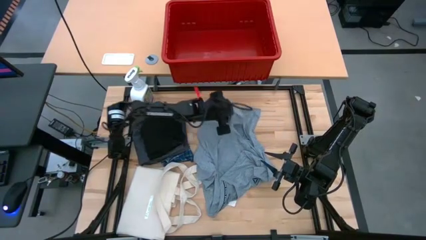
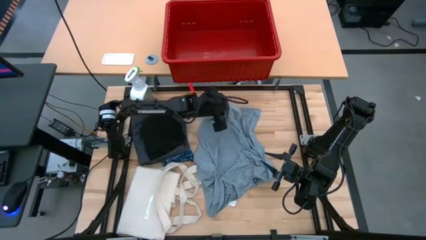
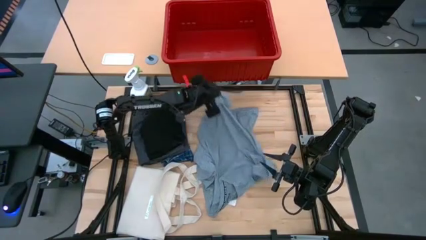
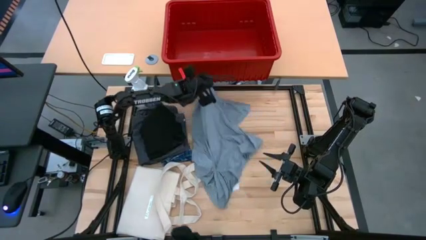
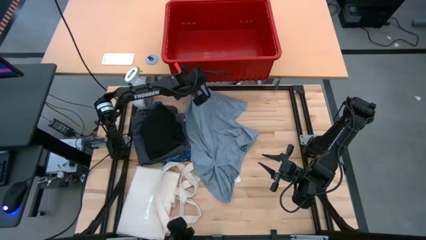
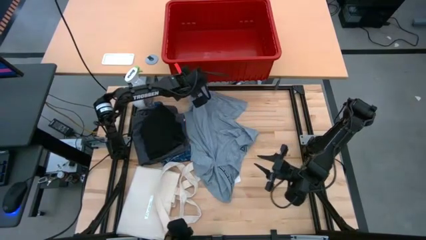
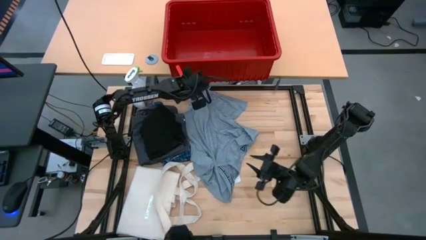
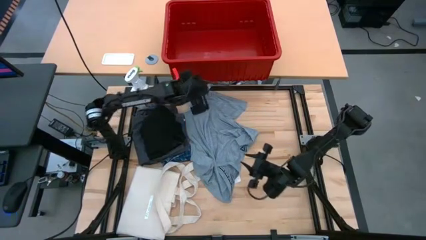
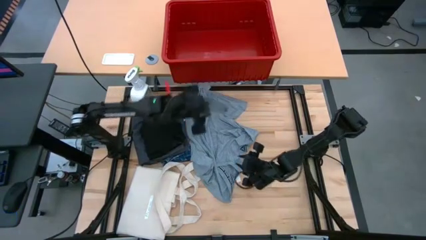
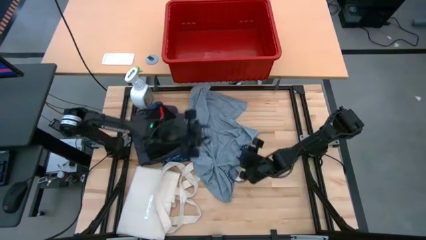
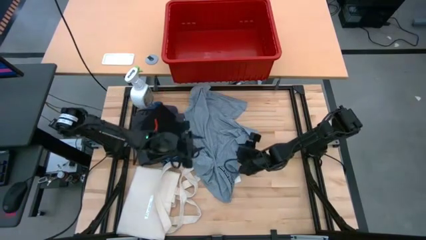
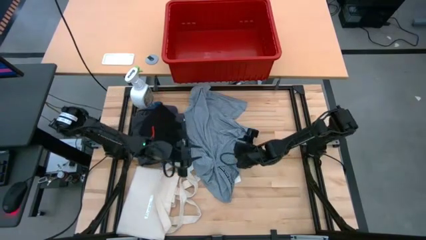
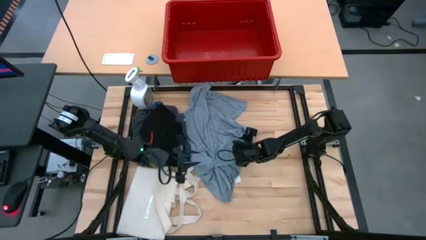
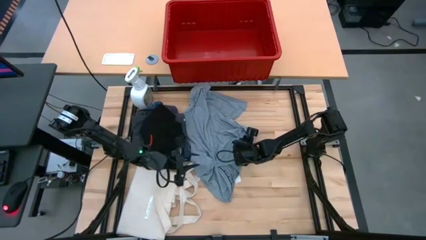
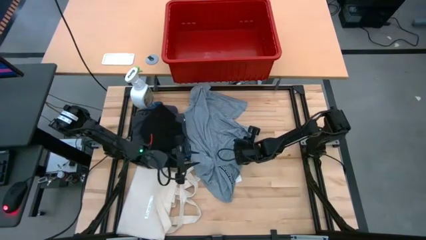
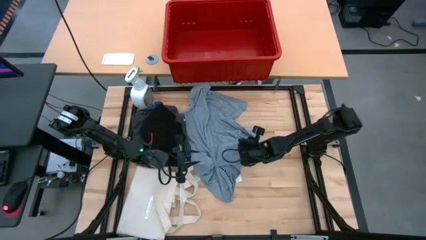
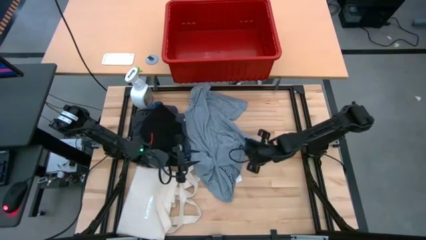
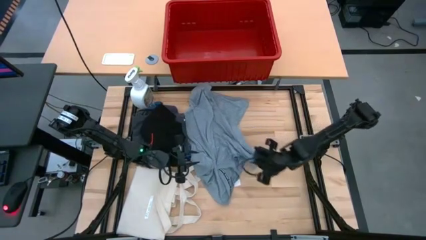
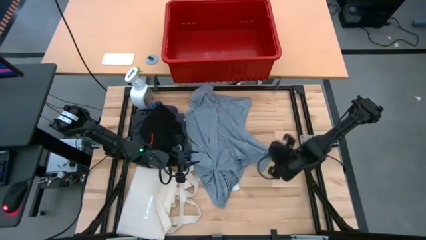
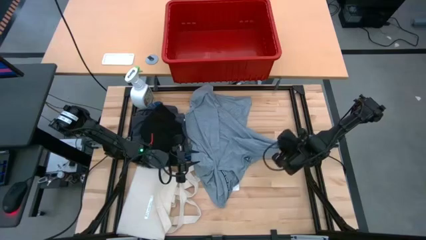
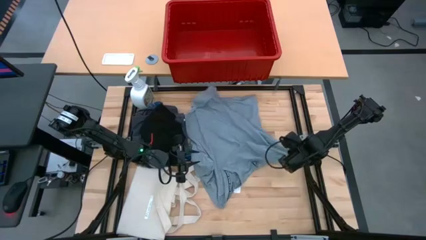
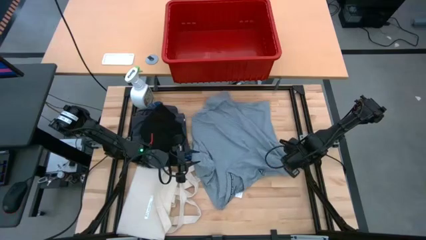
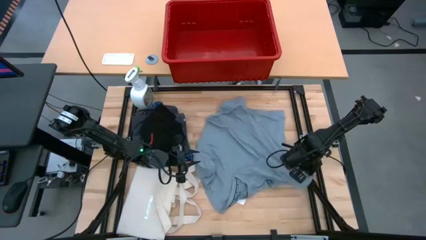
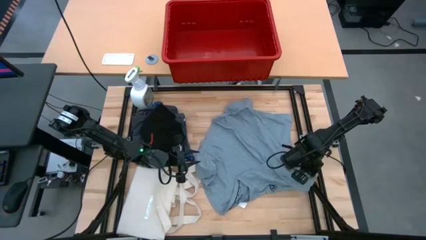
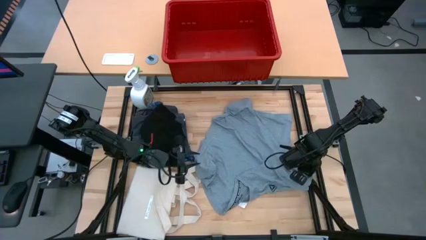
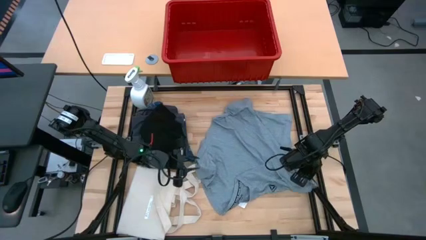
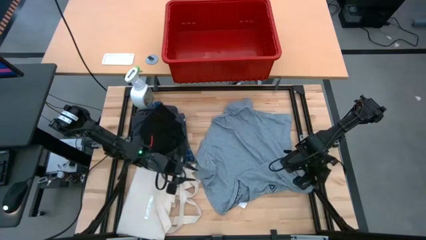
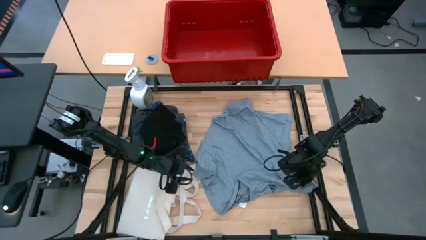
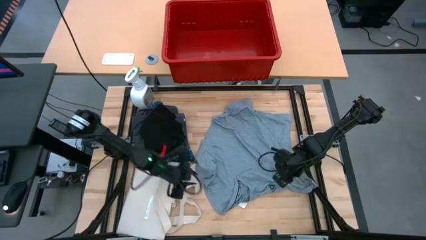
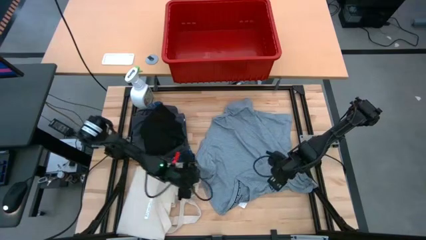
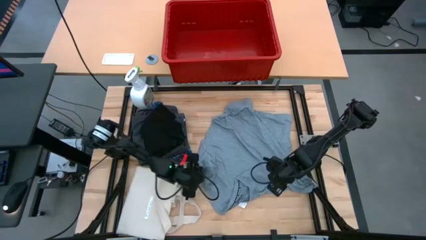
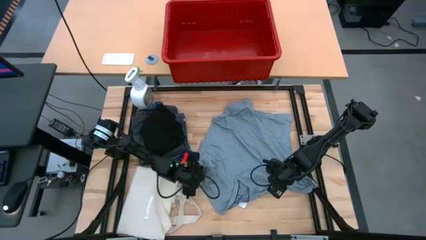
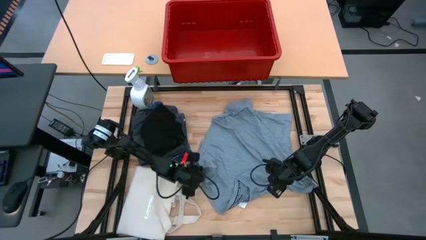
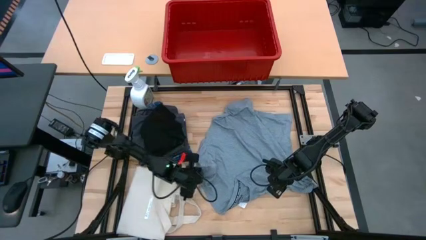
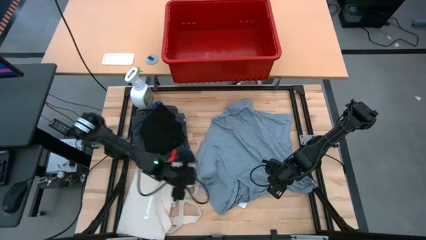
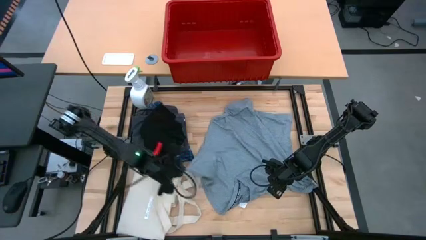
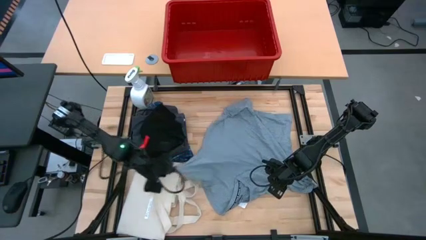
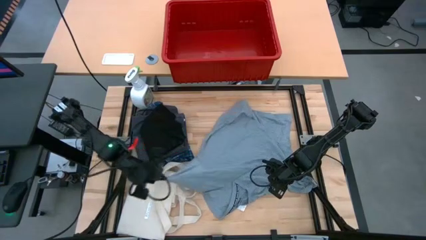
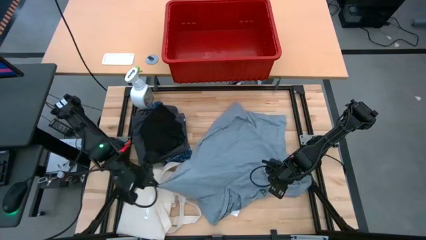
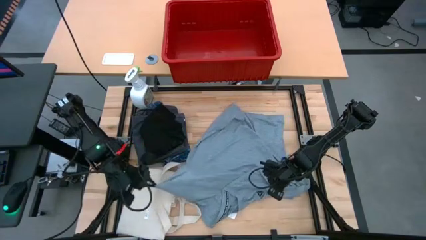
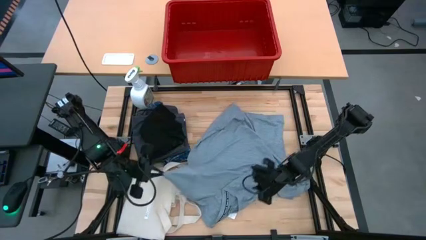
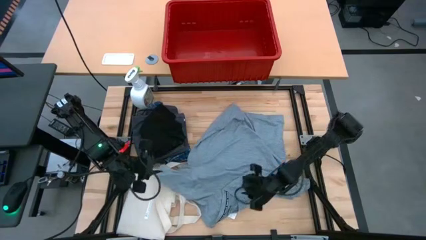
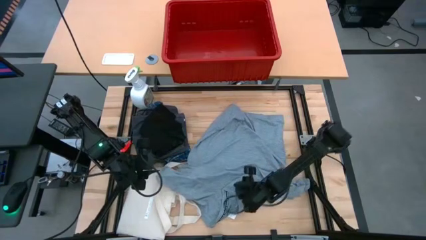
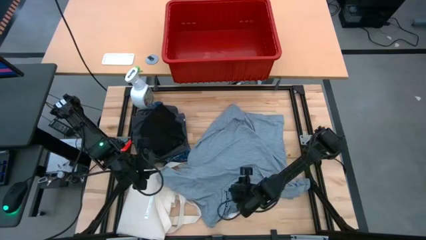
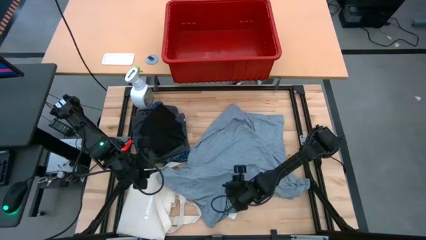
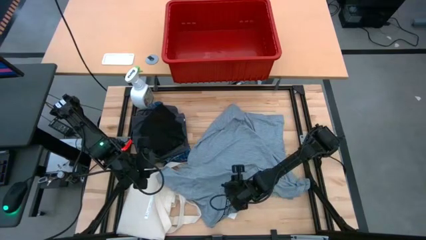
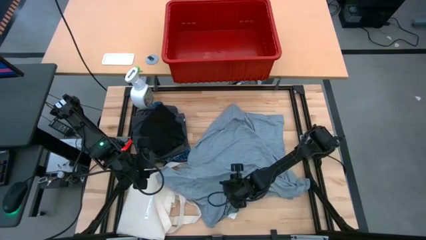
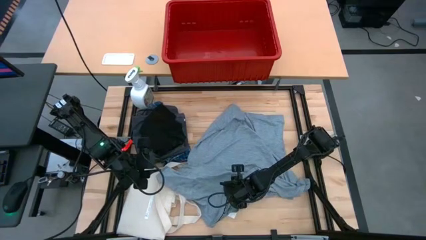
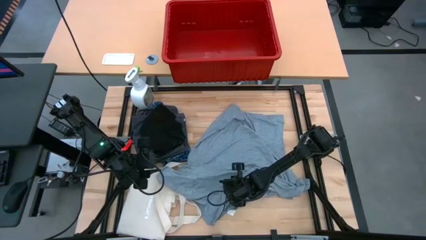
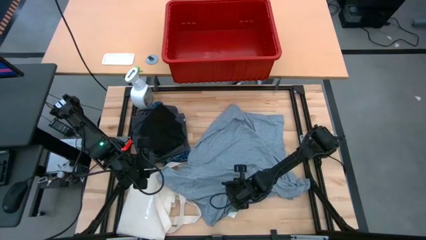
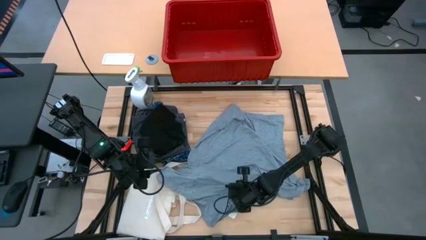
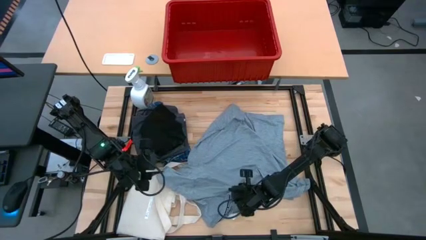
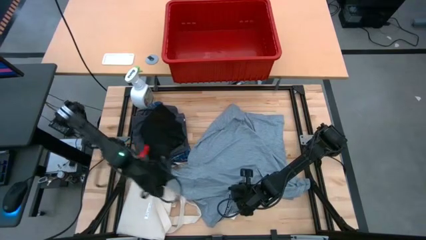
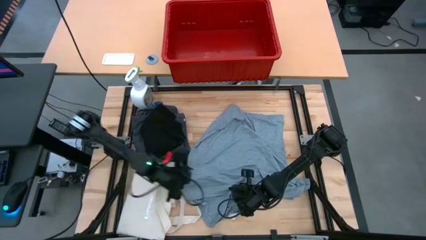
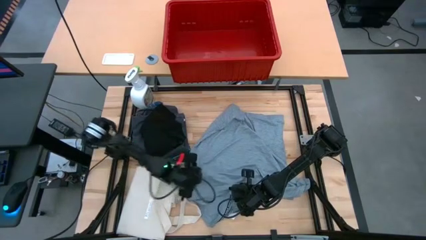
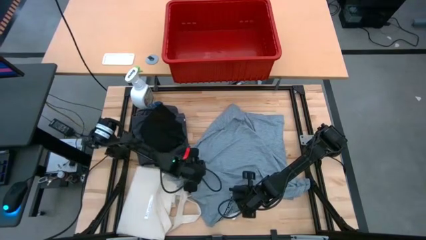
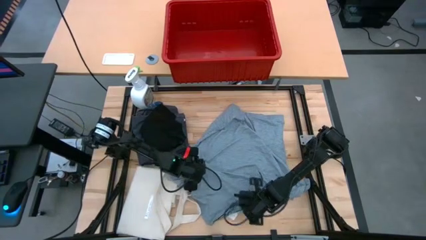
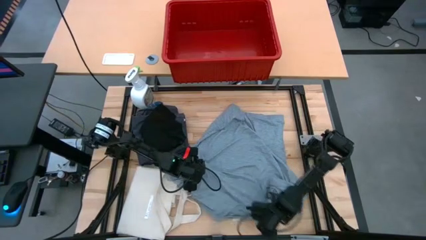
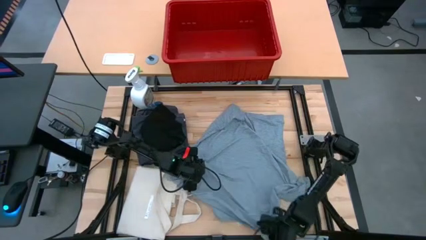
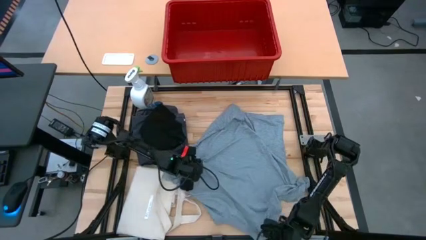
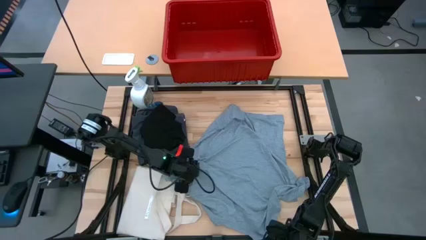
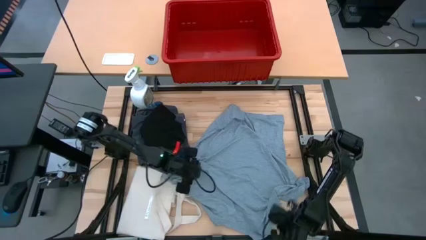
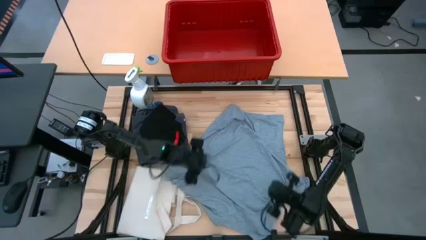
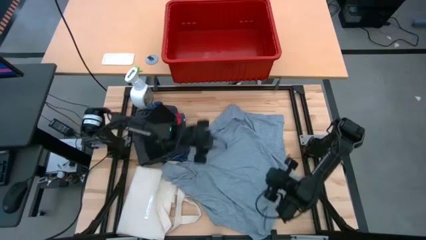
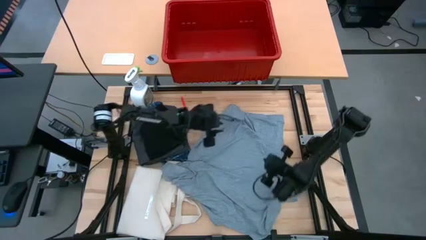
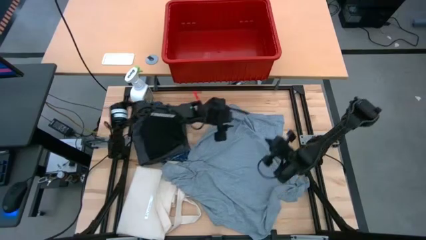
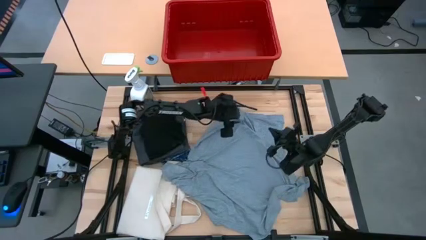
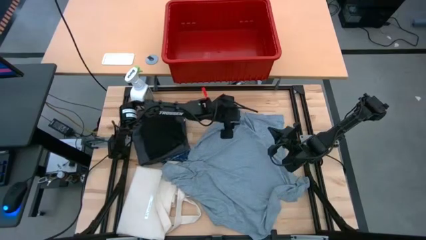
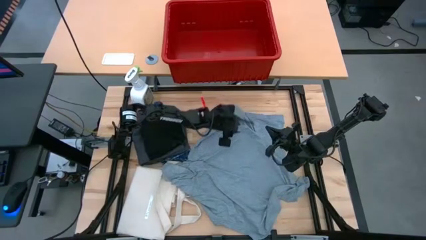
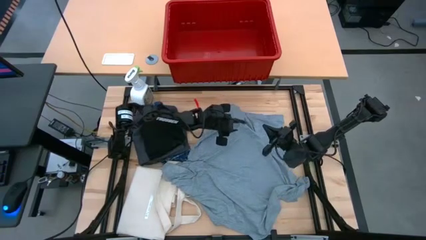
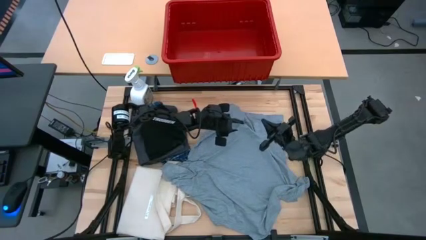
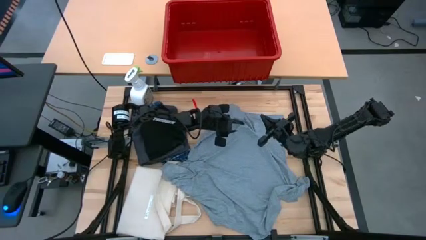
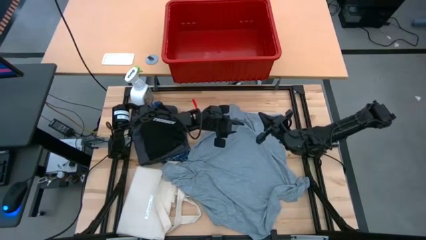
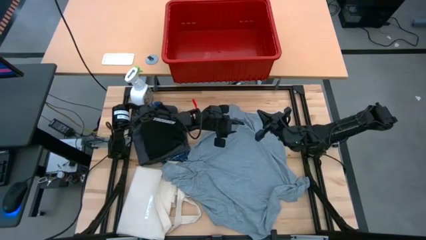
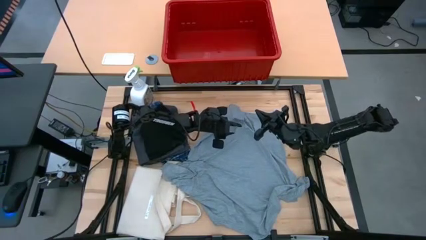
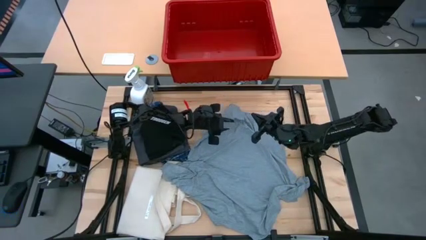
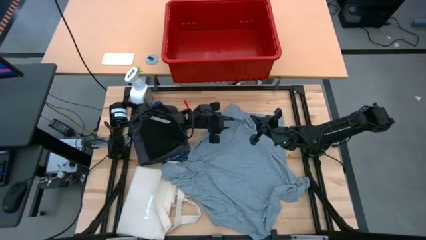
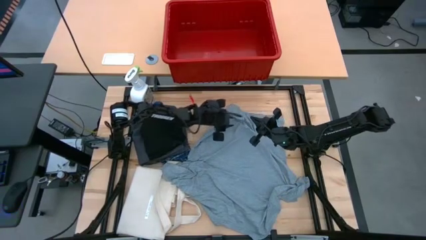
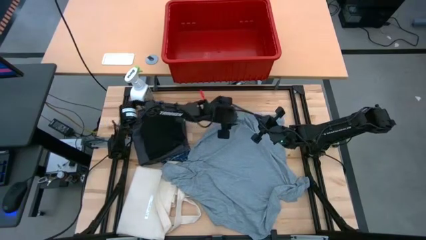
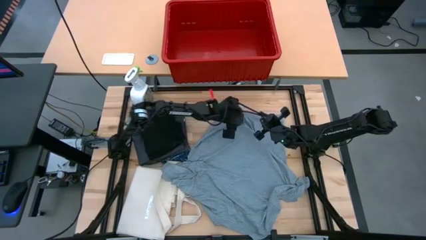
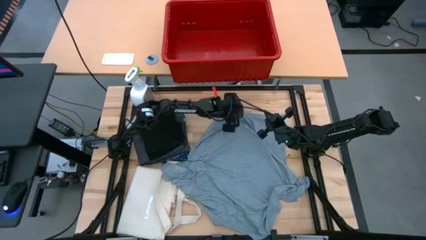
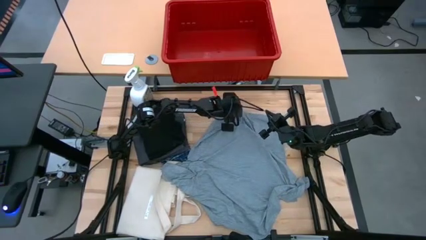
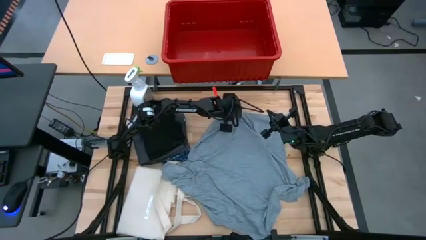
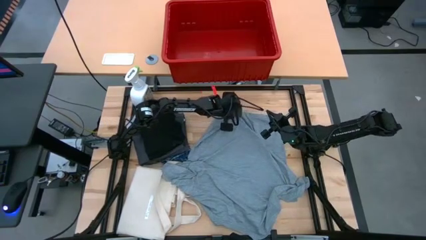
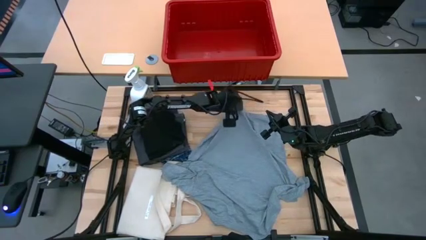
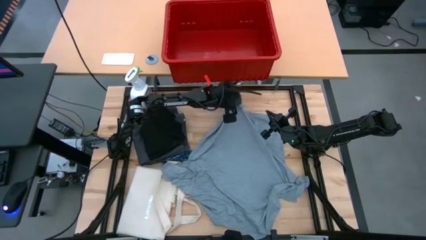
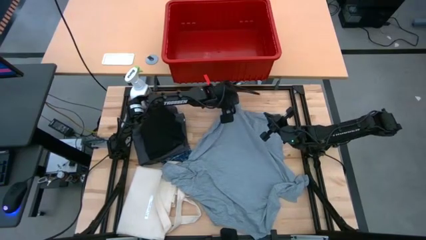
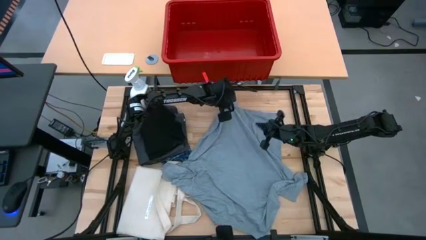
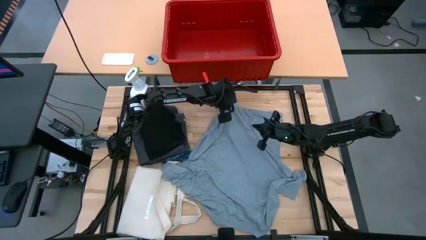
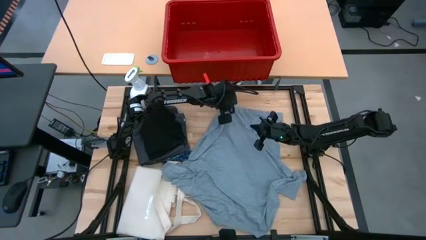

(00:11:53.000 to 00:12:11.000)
Task: Fold Laundry from Bin
Fold the gray shirt
